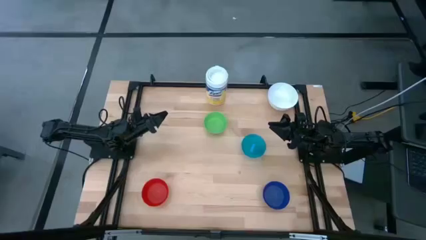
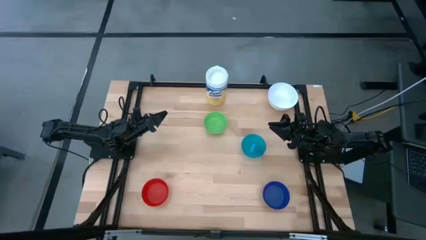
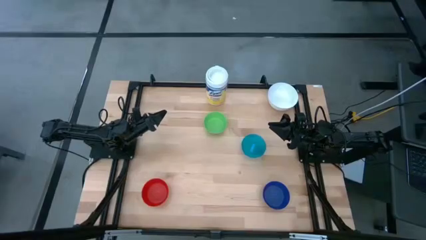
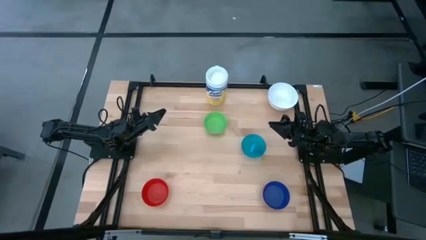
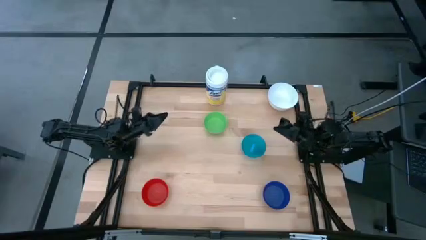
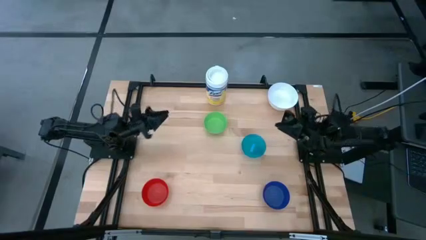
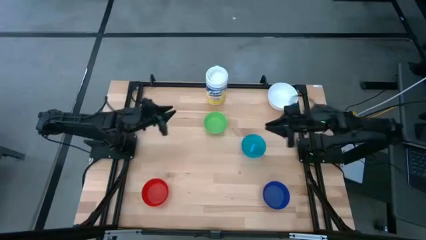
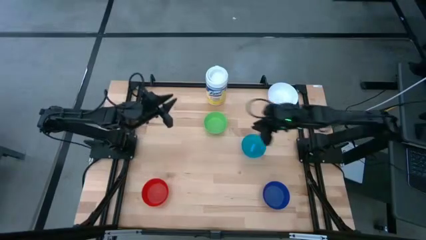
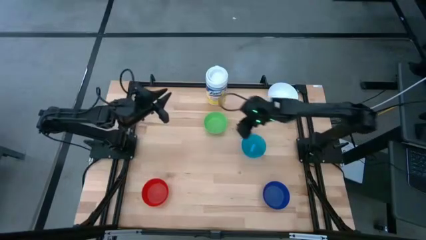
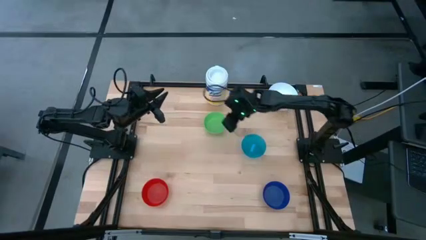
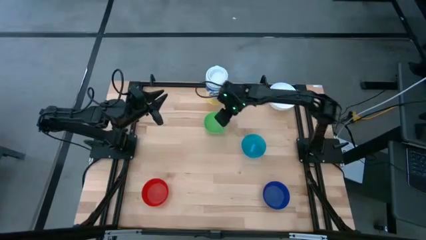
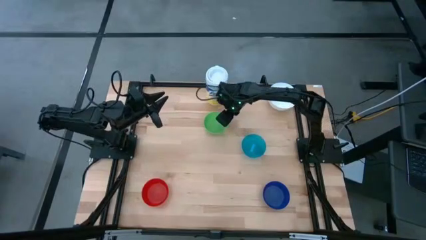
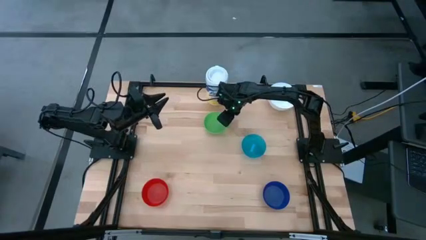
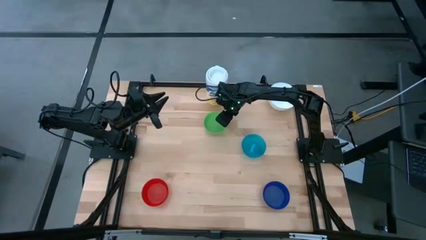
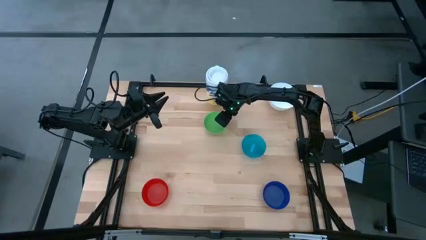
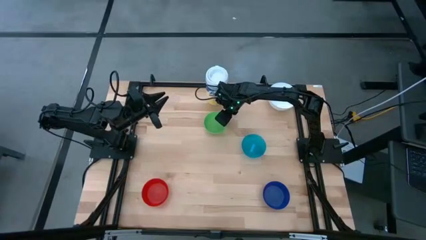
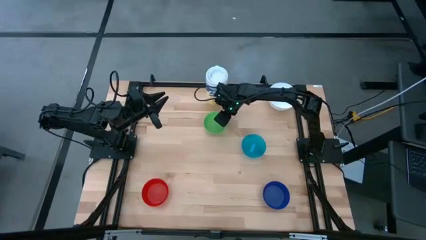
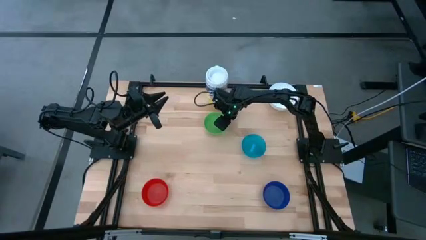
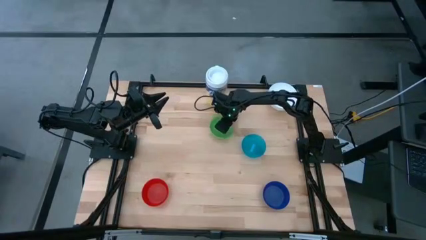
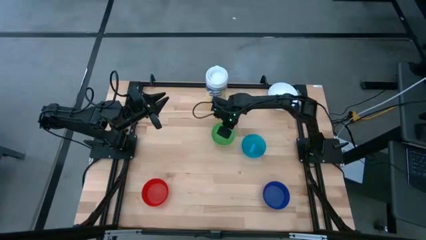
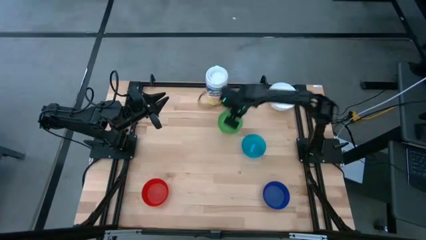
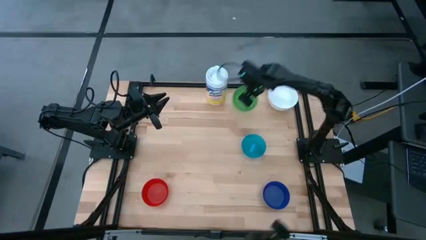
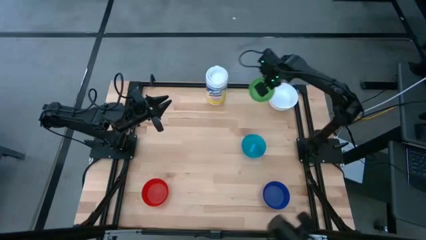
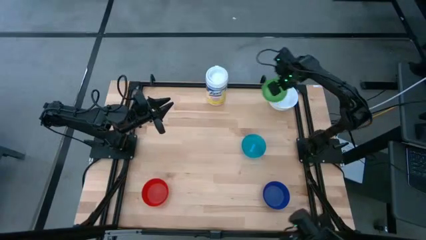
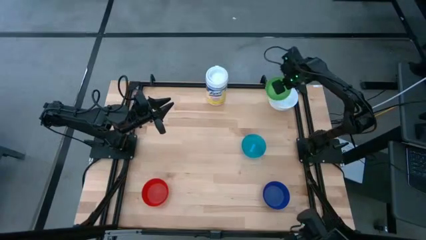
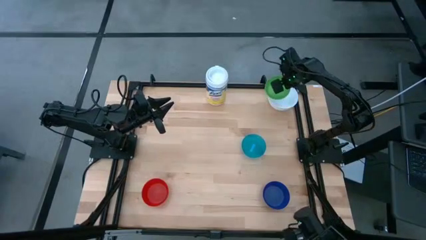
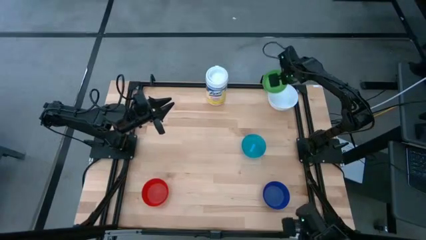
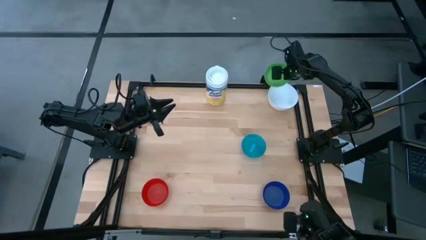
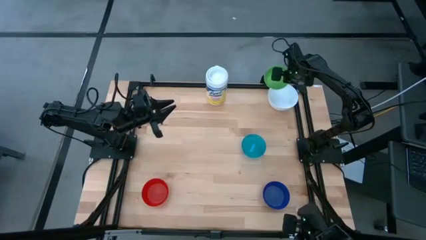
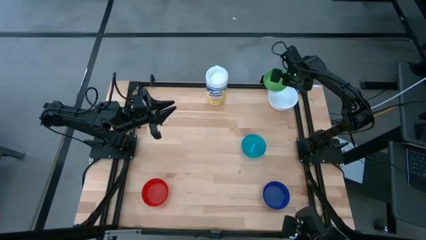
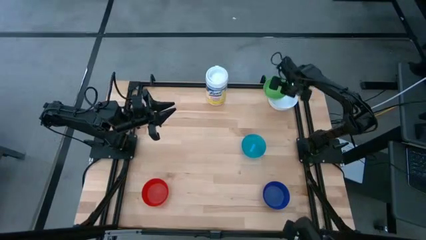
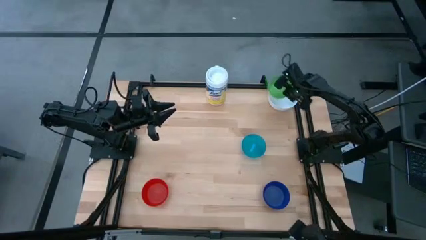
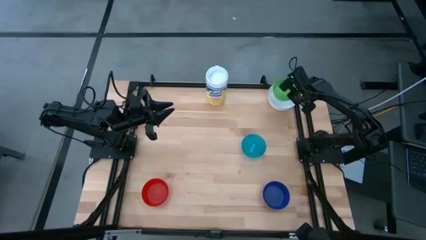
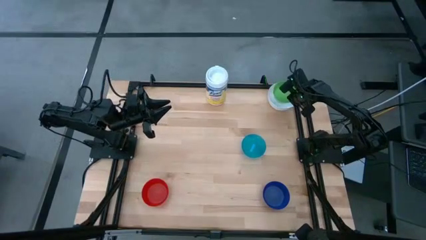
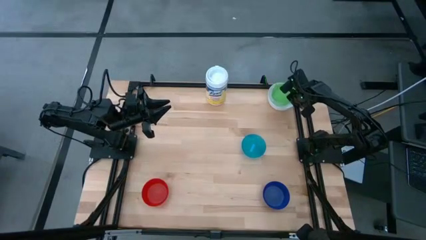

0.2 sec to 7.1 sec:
Stack the green bowl on the white bowl

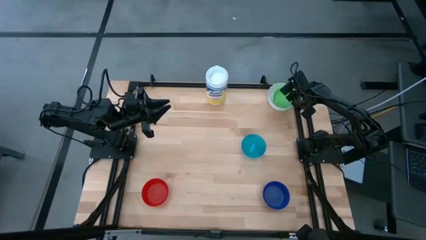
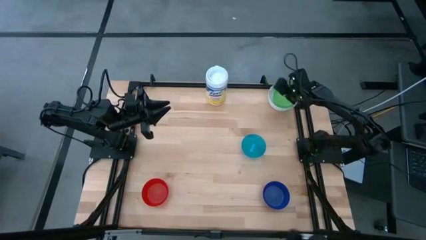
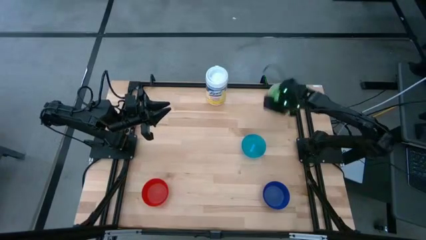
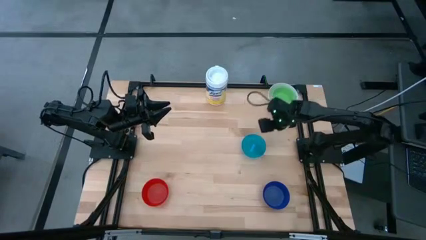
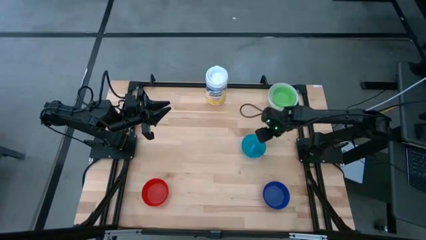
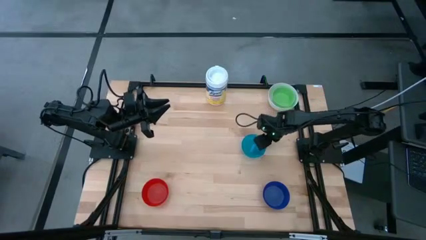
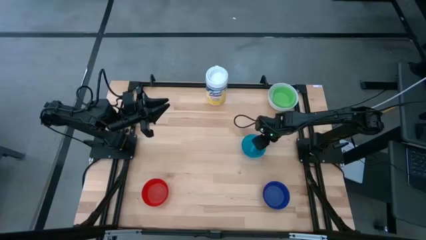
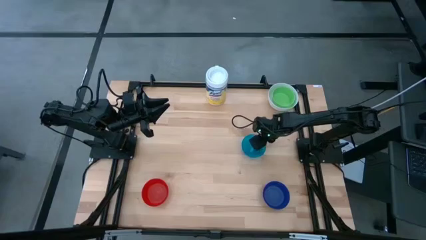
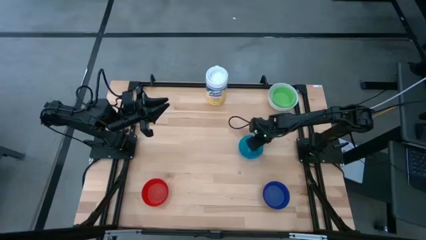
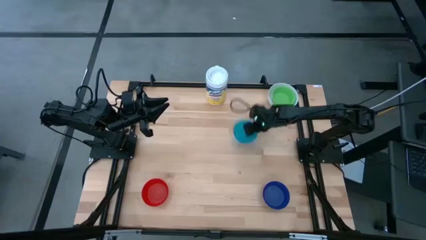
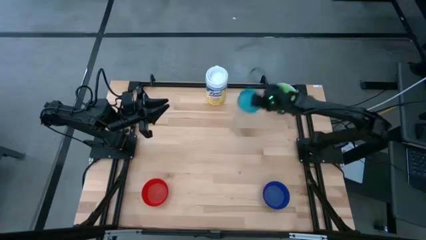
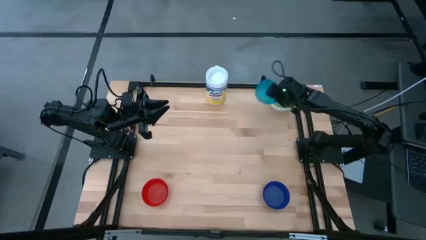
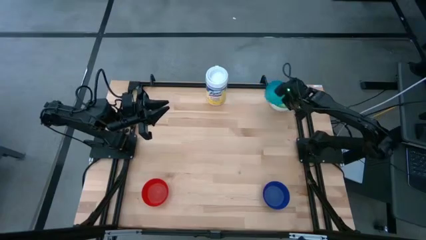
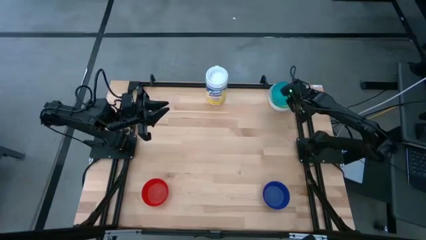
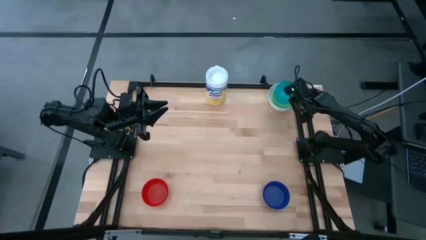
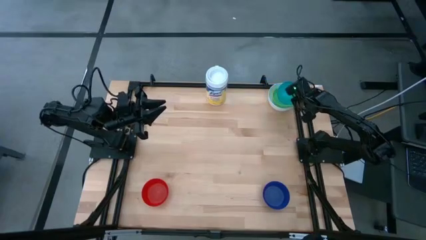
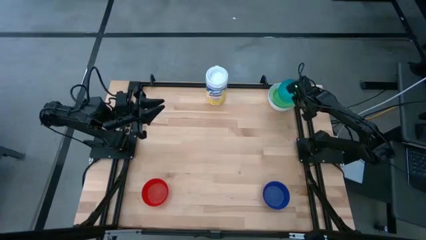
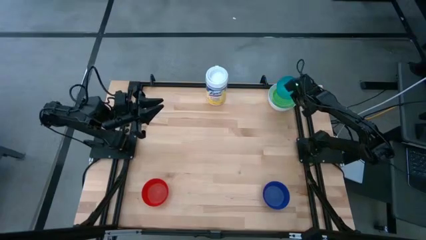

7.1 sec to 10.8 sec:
Stack the light blue bowl on the green bowl

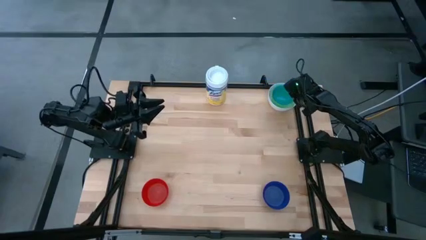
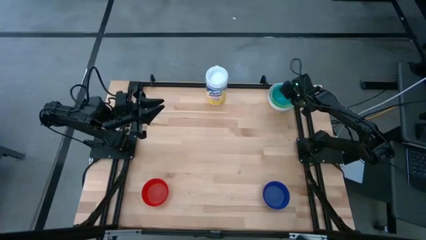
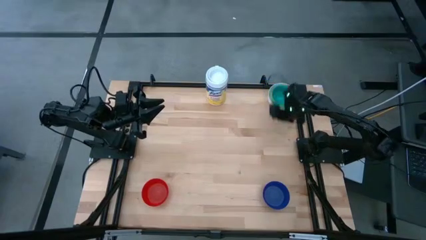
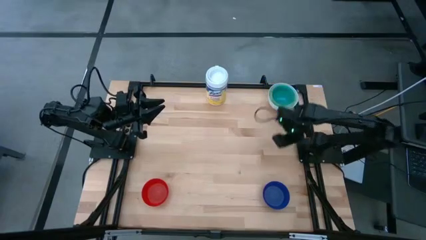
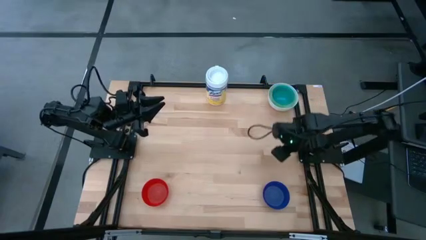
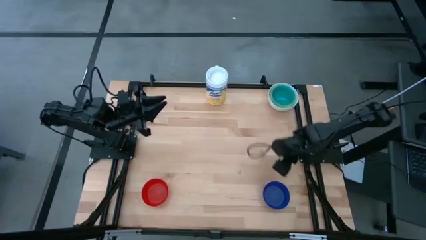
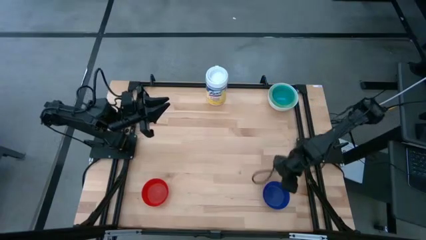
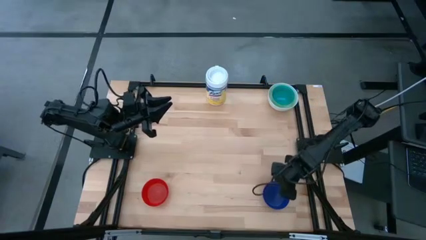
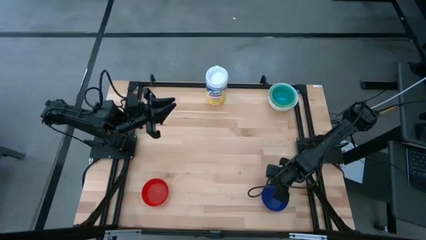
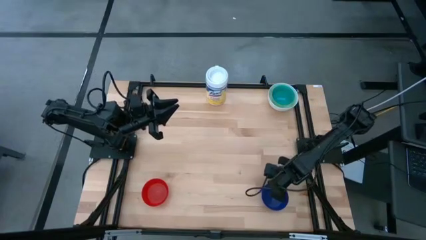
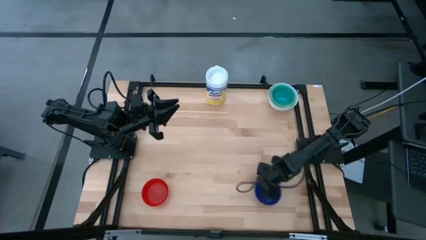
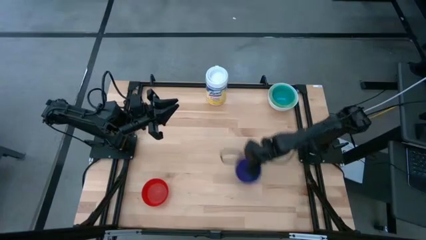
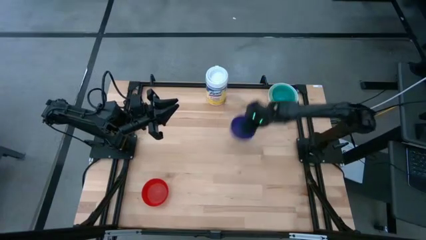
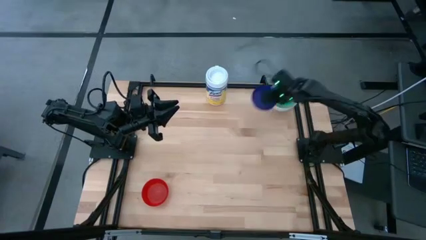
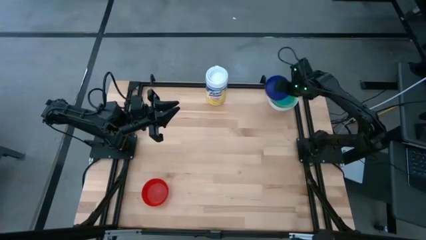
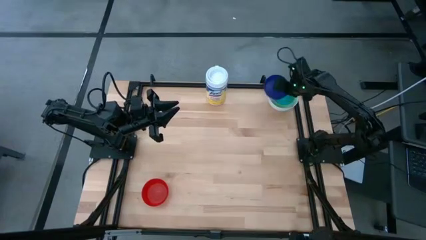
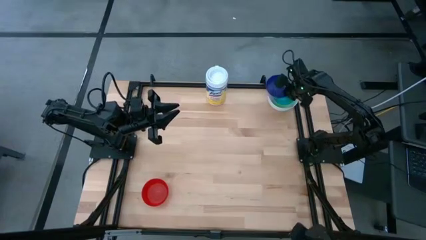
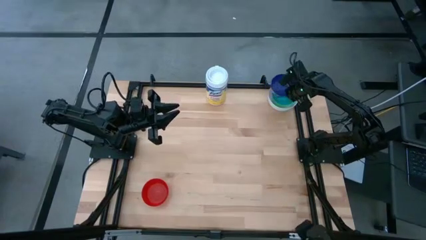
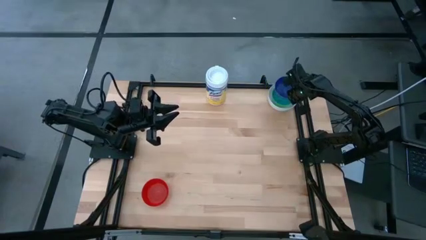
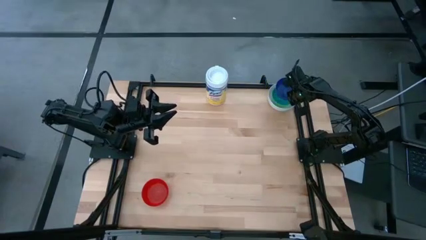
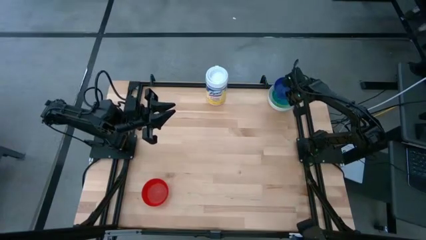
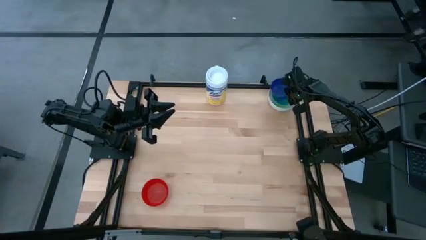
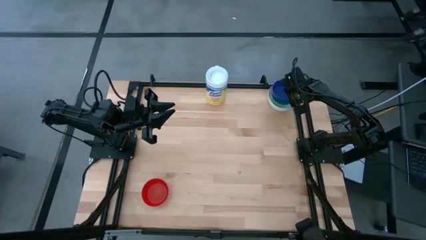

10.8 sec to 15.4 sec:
Stack the dark blue bowl on the light blue bowl

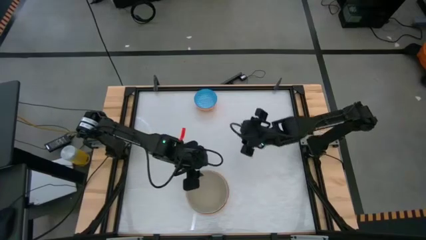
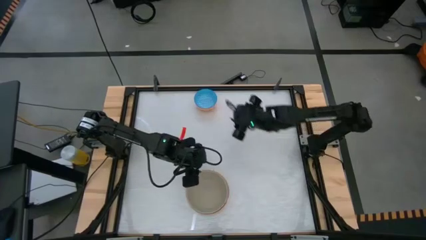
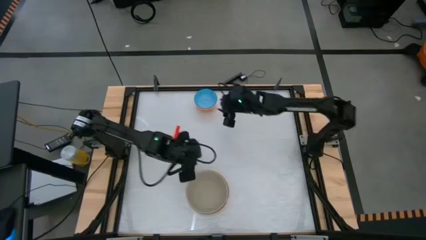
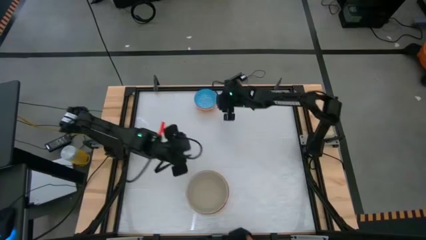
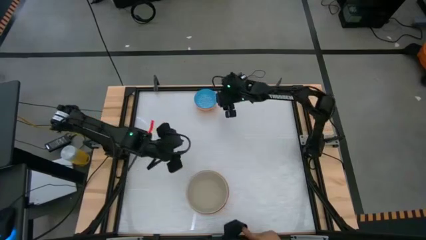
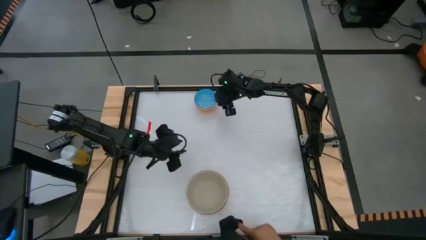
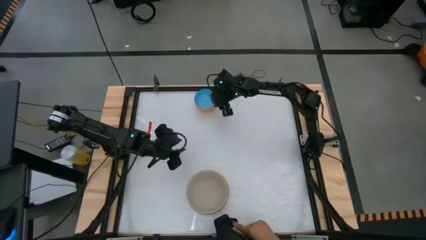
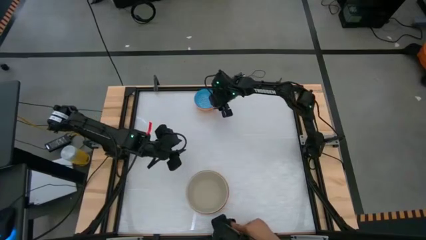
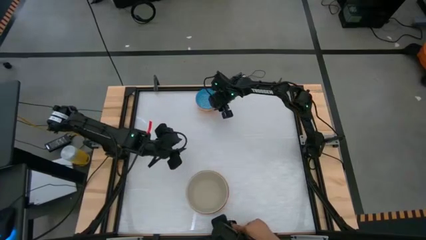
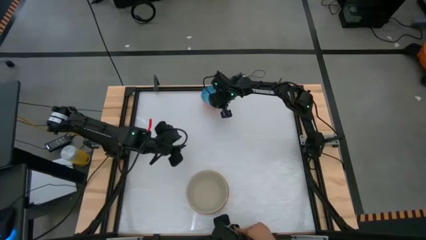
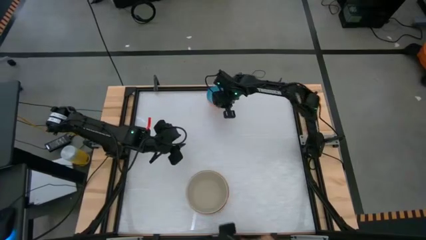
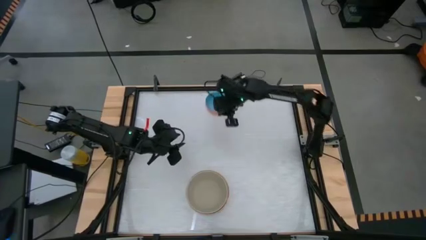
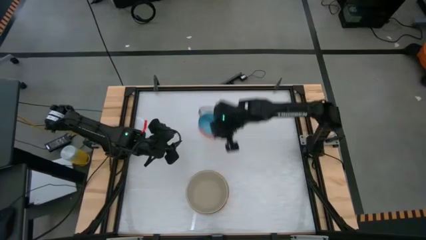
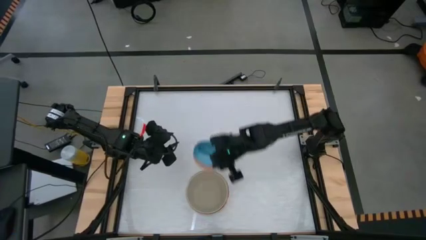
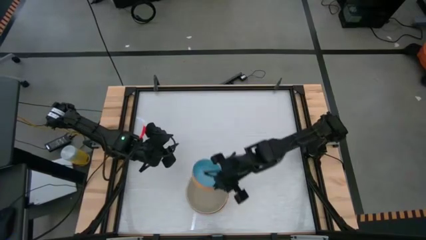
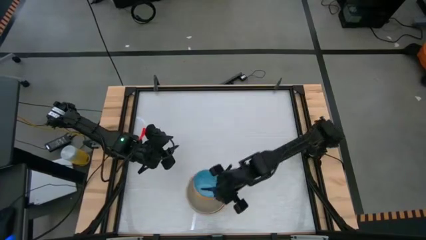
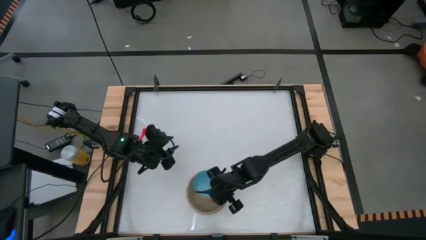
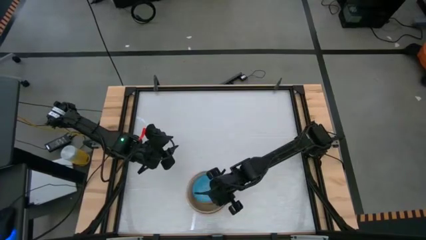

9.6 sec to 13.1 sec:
Stack the blue bowl on top of the gray bowl
